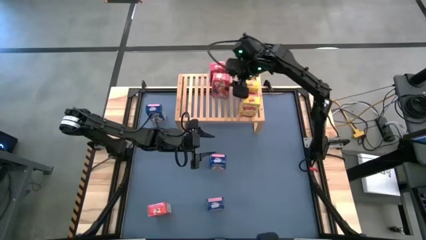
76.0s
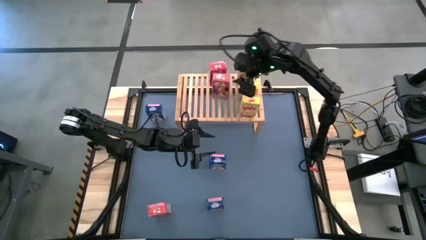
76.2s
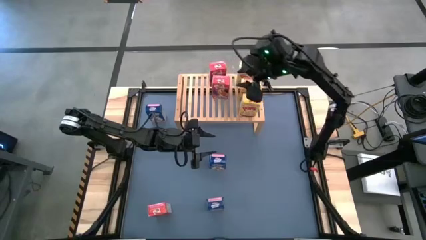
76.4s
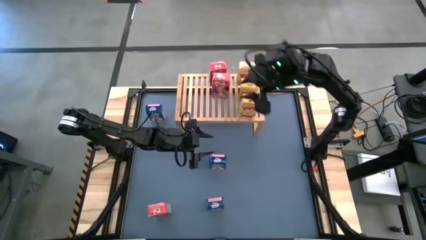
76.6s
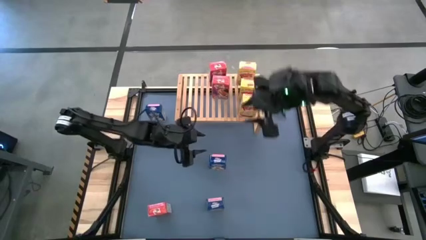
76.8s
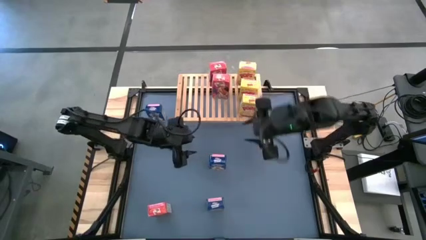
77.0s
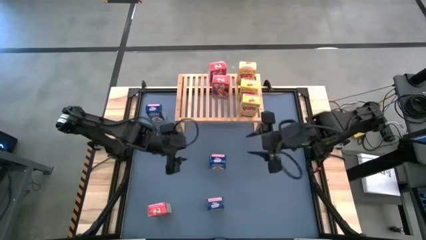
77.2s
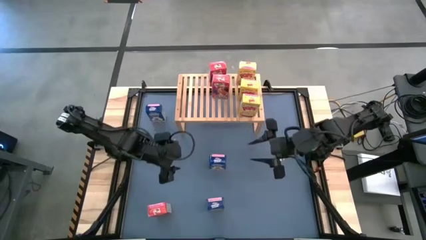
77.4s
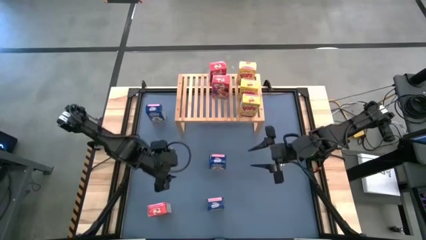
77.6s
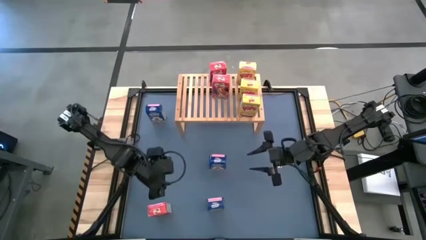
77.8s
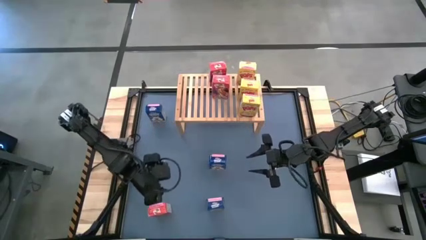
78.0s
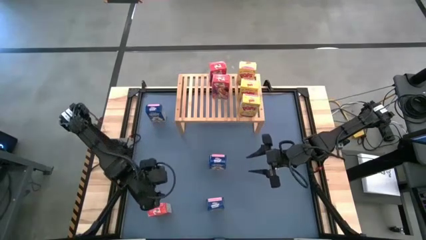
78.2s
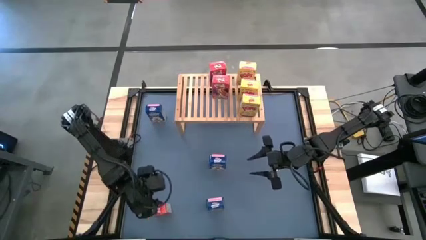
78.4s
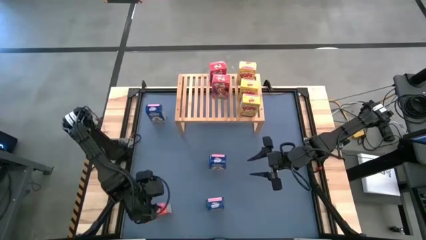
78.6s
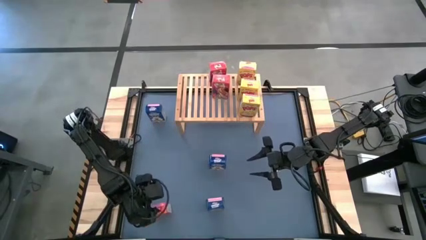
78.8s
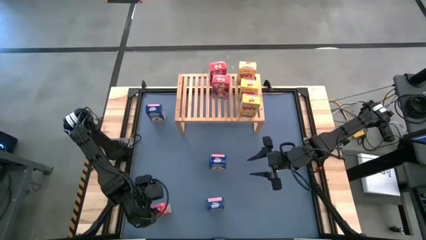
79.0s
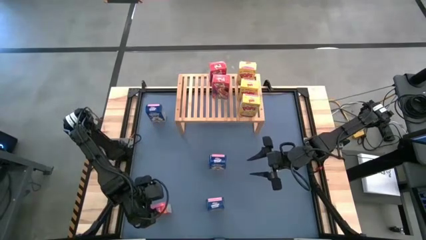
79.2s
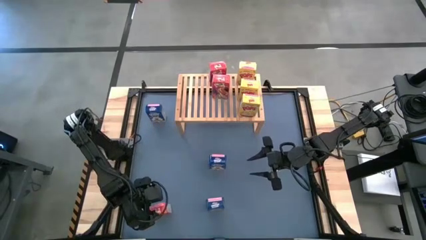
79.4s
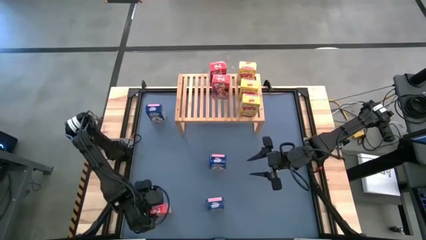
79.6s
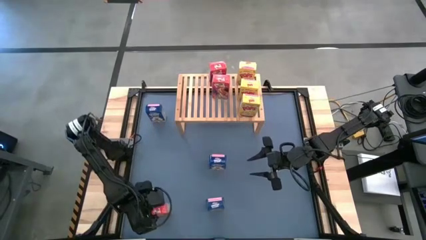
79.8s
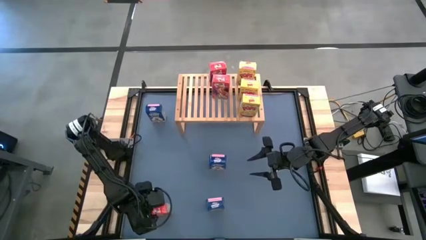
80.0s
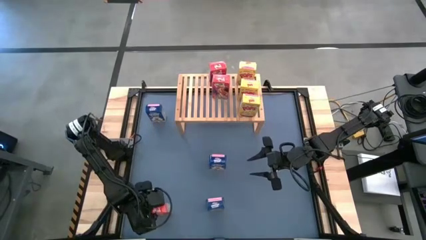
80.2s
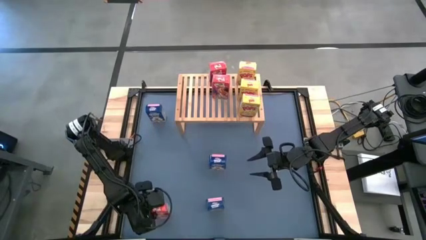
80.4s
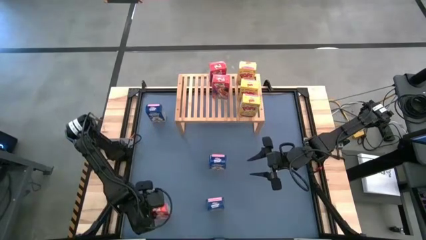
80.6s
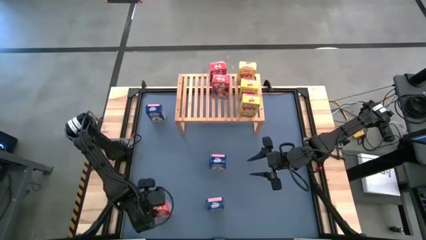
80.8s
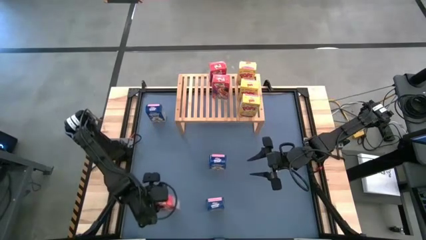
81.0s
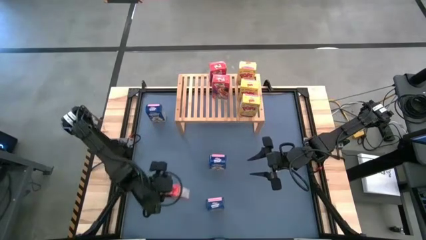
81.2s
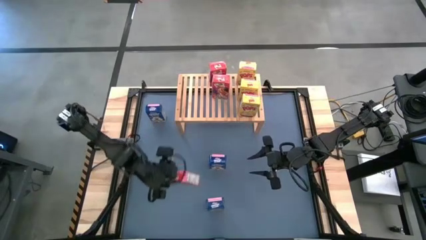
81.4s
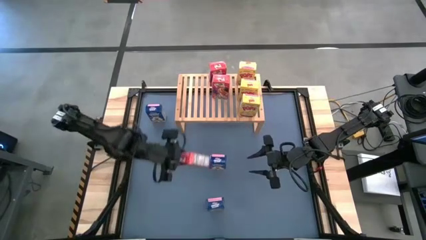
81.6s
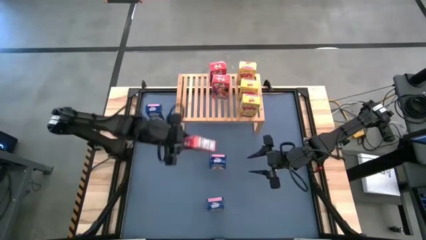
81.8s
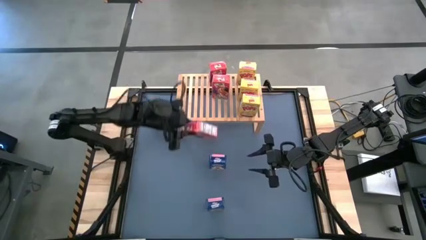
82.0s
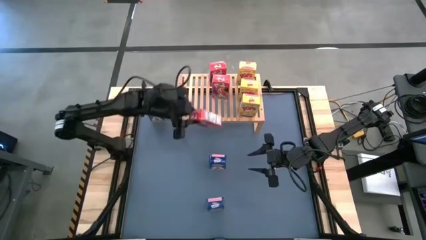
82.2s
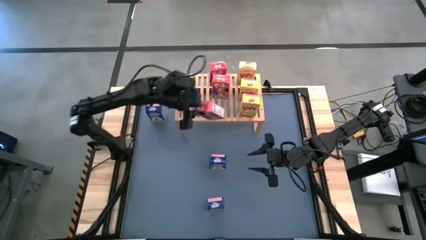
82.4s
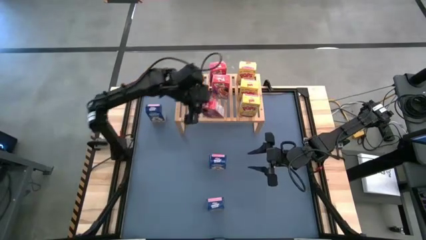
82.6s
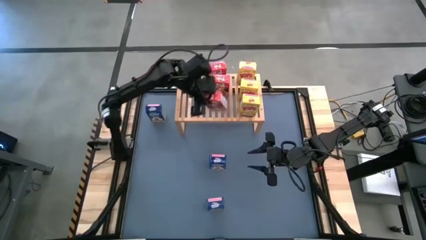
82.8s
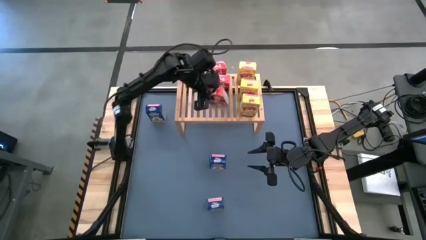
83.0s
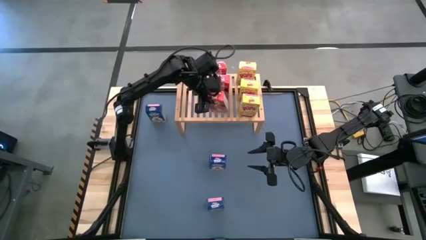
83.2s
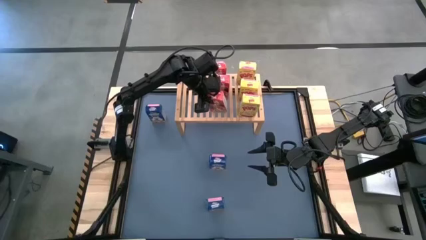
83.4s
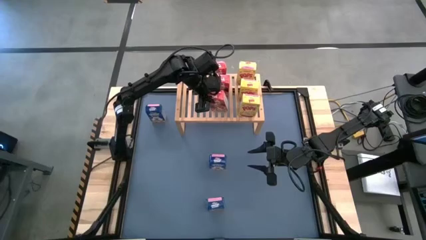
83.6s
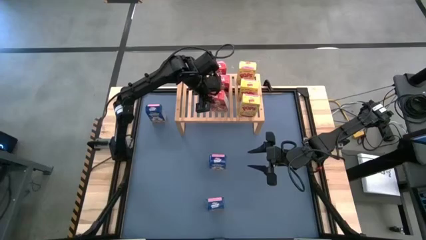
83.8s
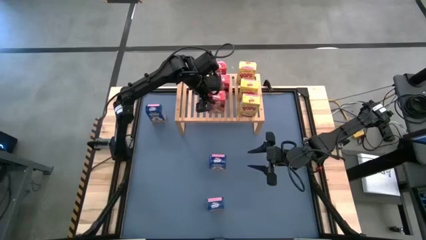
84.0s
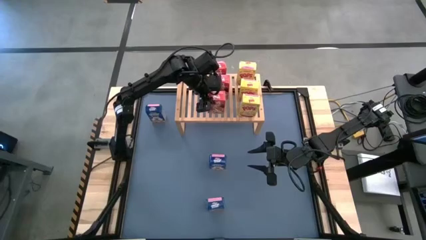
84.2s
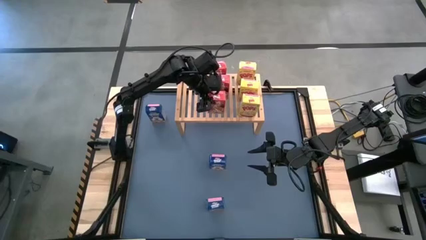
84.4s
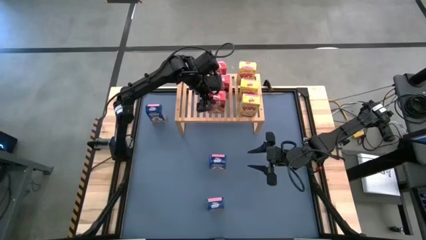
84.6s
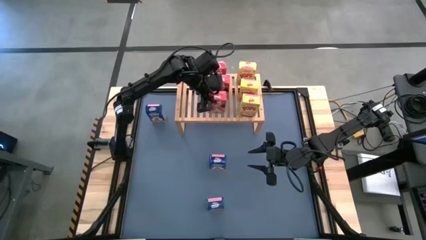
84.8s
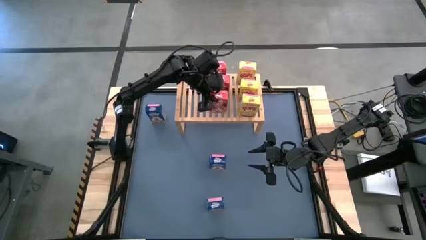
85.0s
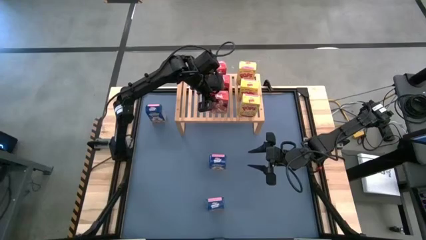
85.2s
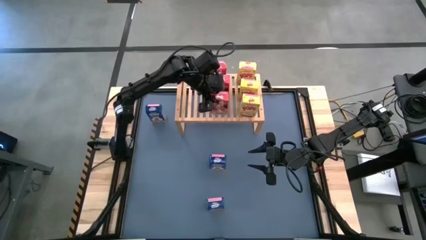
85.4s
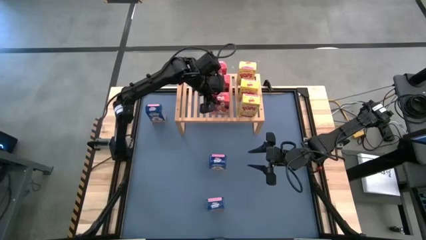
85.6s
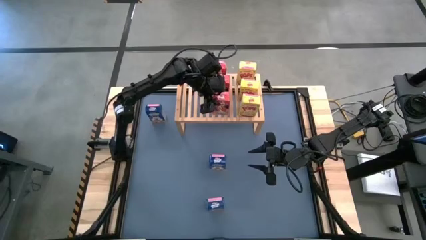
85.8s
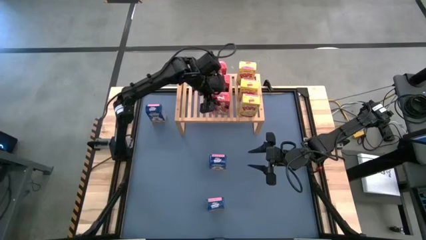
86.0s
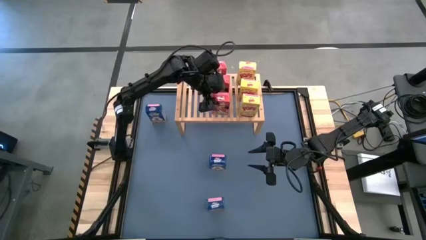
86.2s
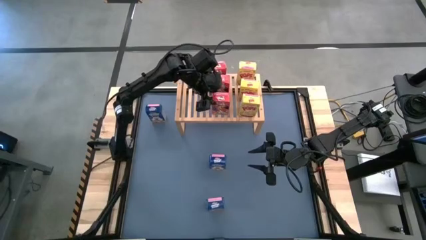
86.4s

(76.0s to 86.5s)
Task: Stack cereal on shelf
Put the red cereal box on the shelf aligned with the other red cereal boxes

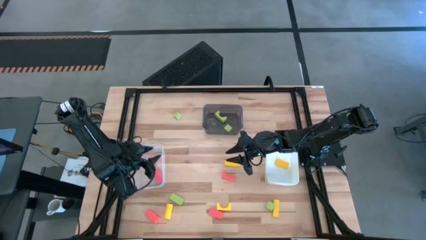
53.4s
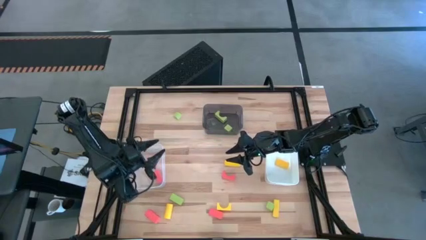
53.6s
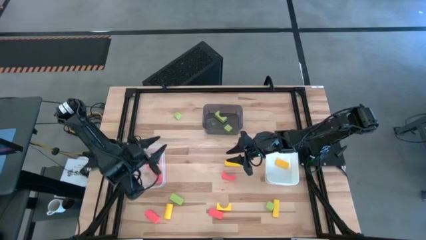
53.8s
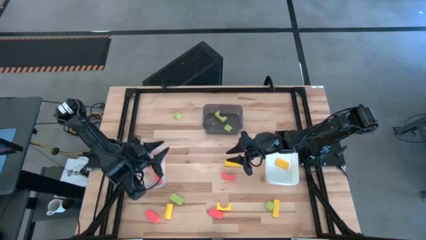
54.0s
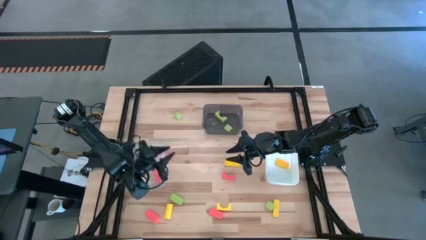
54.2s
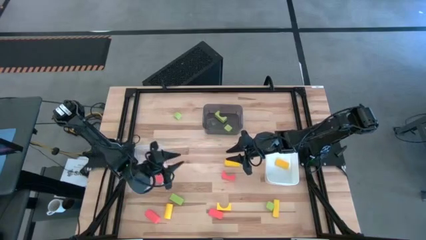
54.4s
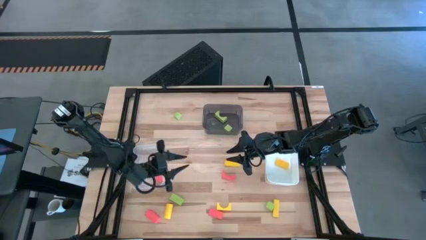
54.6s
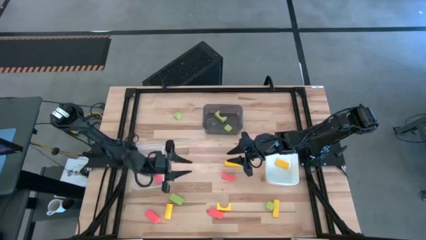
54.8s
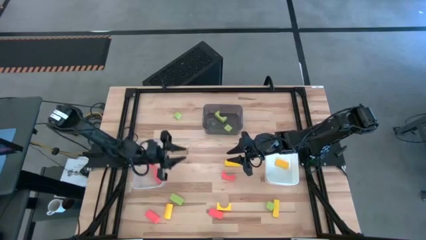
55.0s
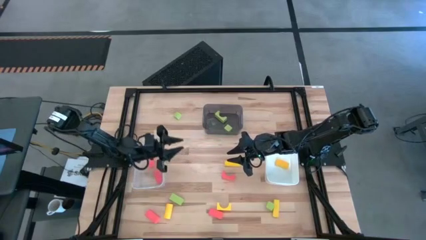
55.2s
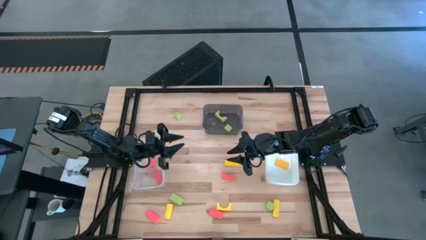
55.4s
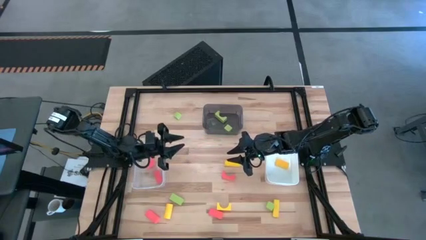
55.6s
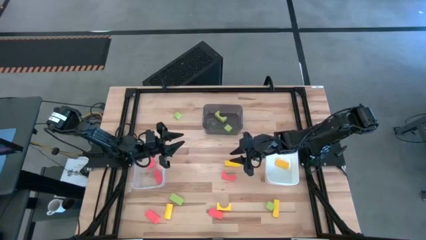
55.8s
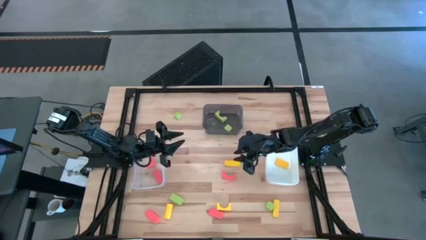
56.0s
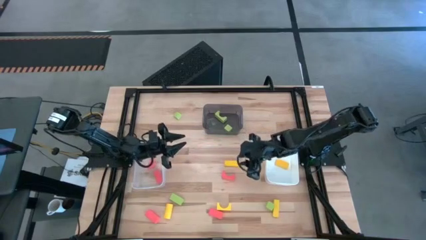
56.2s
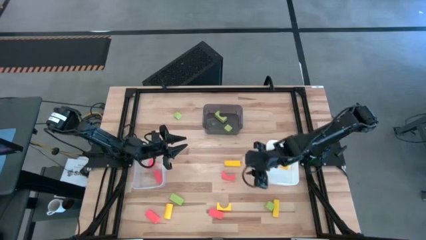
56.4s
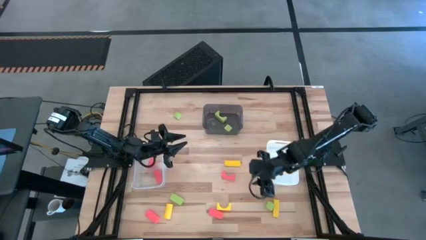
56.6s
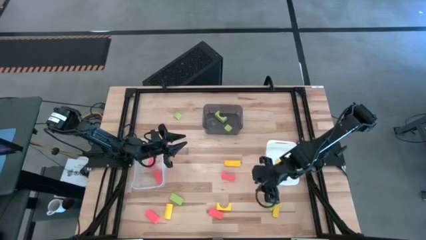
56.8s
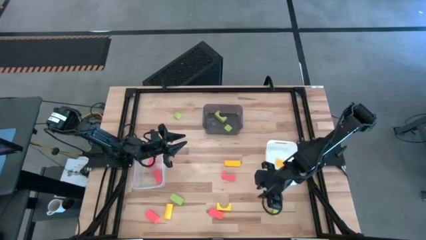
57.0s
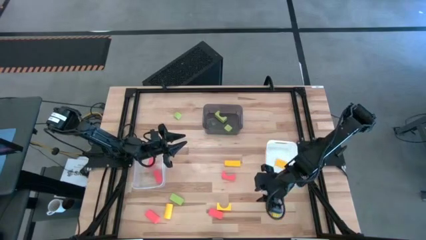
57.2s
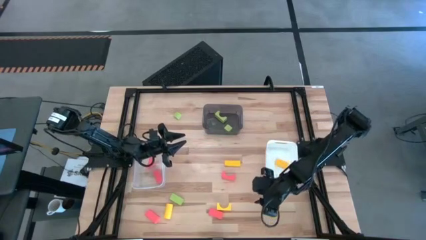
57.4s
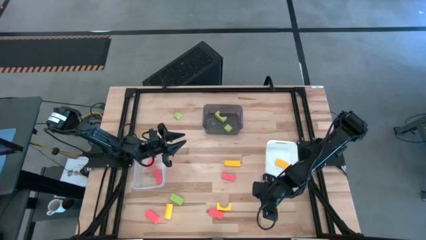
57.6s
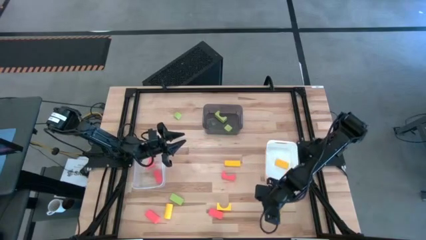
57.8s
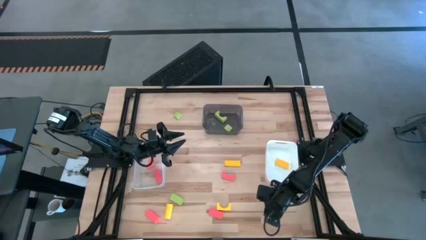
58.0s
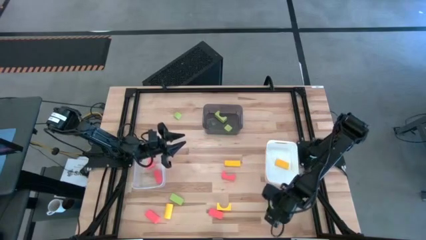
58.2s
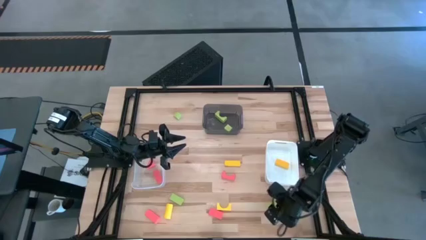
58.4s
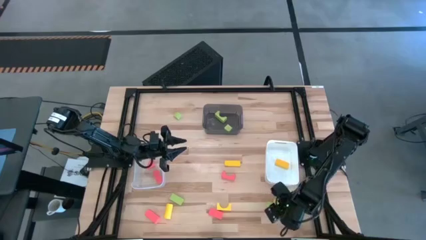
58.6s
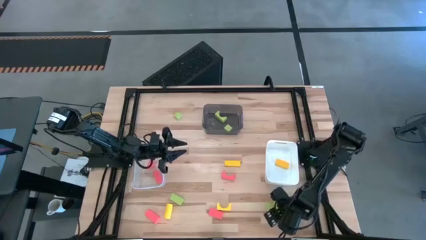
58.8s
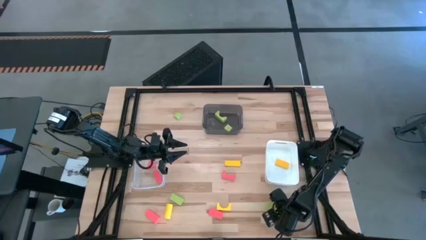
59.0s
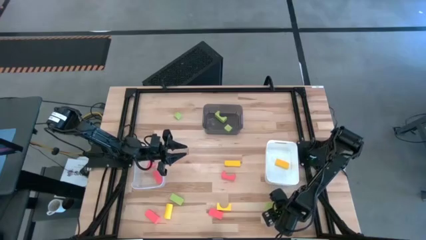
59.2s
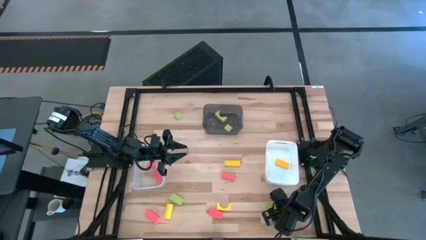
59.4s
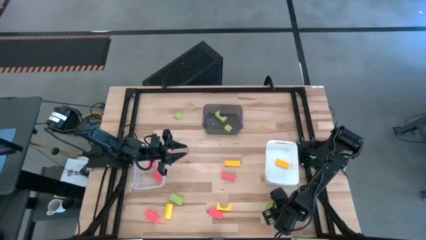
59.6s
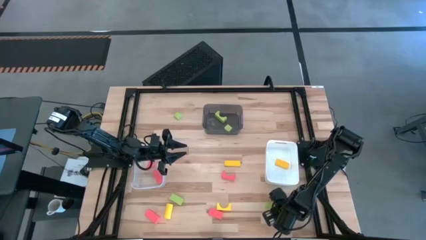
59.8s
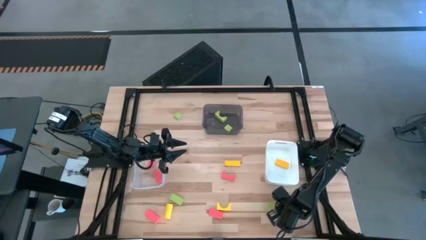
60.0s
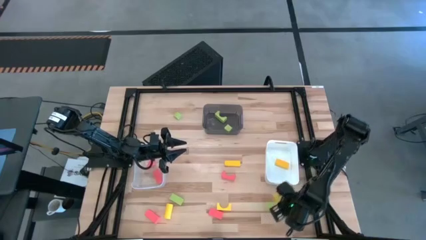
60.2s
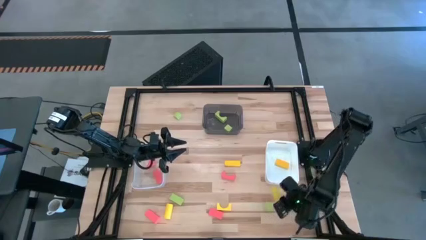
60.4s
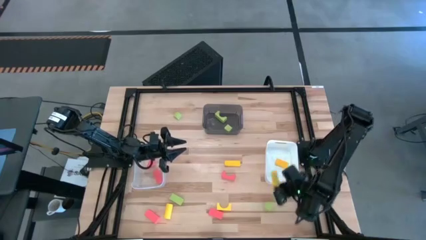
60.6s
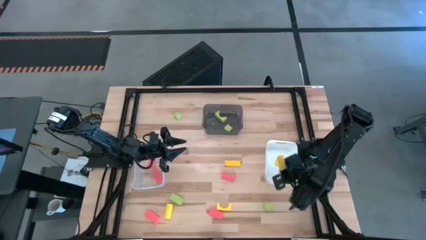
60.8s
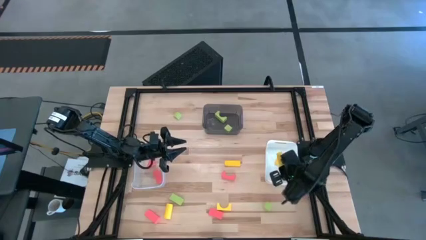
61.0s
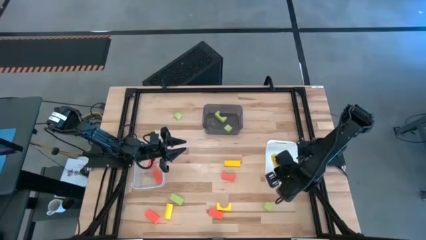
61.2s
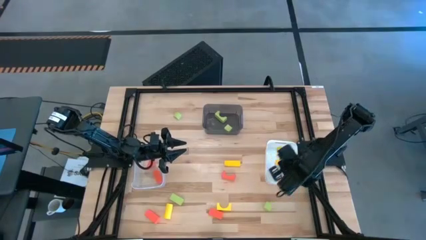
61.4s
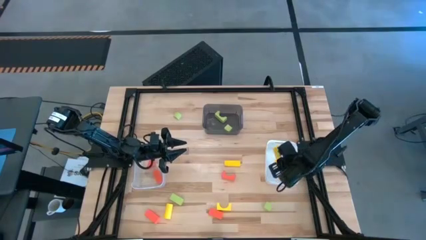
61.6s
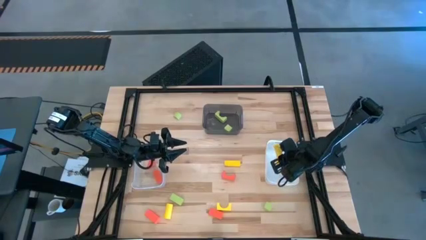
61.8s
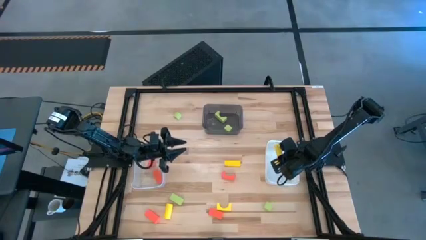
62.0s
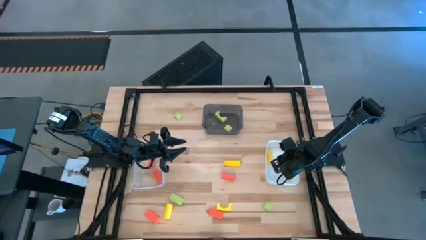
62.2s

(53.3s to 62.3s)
Task: Sort & place blocks by color
Put the yellow block into the white bin
